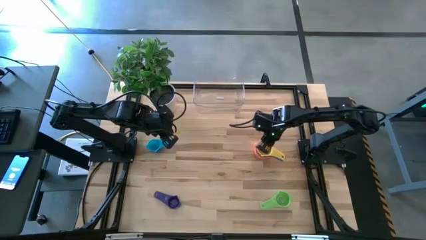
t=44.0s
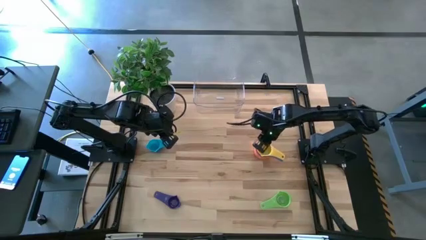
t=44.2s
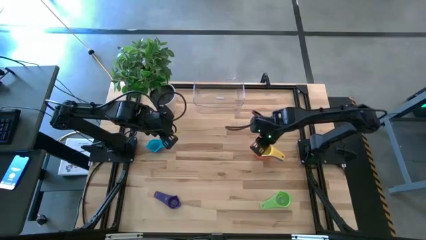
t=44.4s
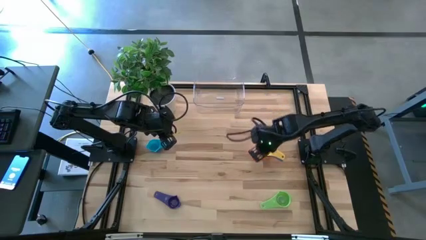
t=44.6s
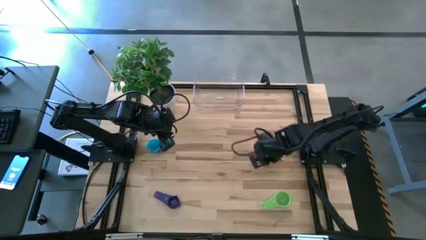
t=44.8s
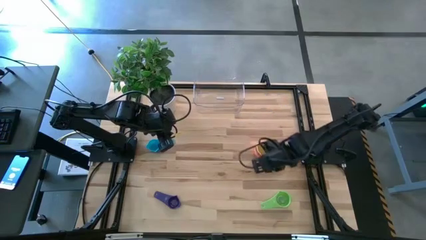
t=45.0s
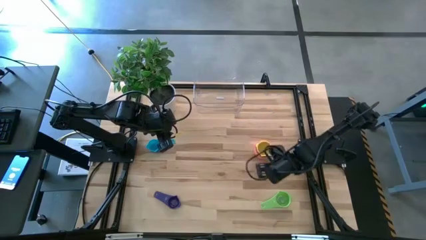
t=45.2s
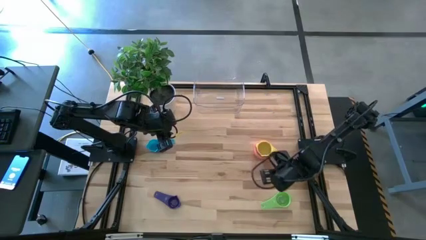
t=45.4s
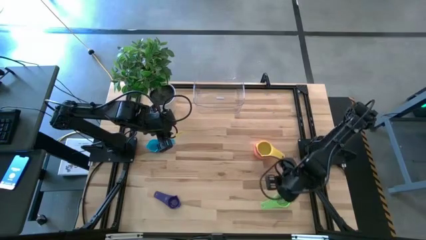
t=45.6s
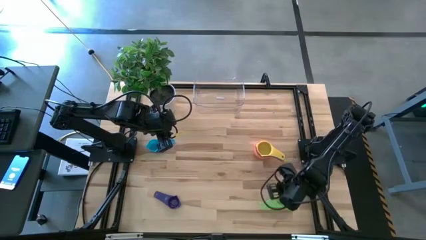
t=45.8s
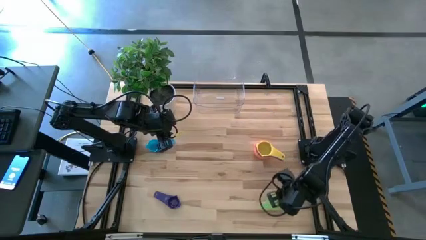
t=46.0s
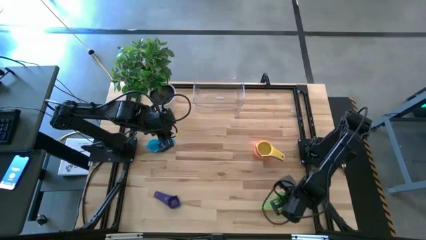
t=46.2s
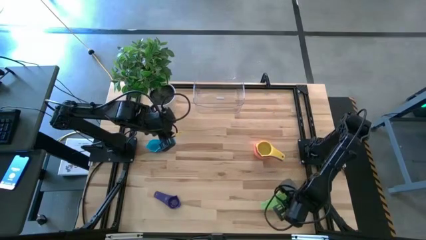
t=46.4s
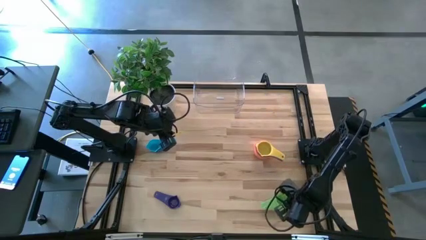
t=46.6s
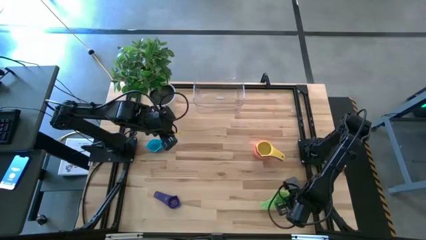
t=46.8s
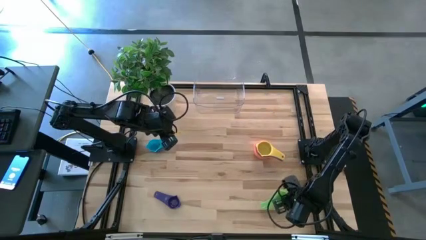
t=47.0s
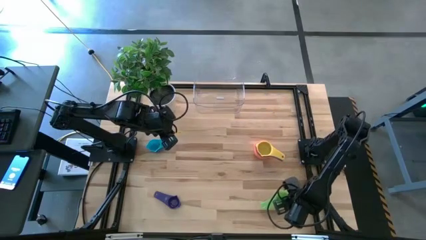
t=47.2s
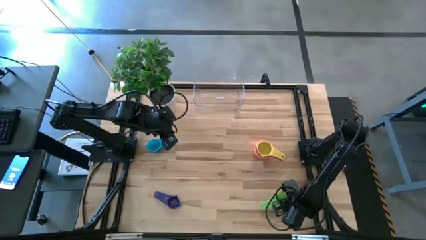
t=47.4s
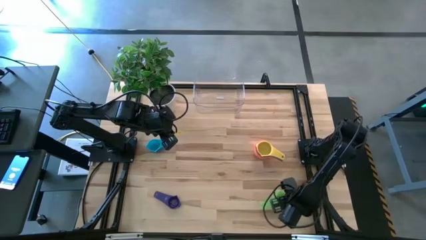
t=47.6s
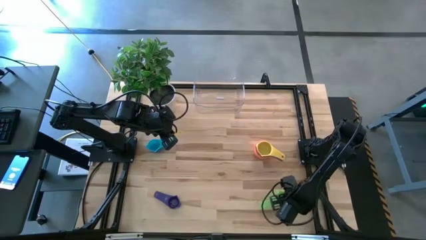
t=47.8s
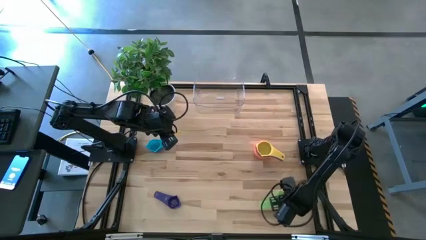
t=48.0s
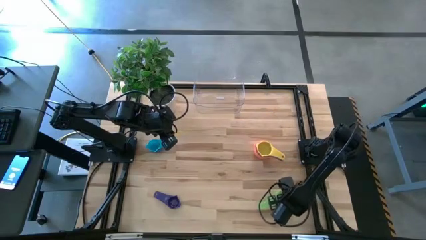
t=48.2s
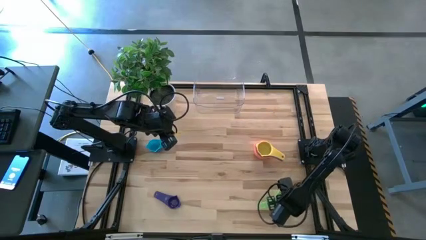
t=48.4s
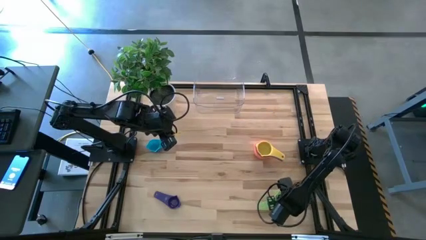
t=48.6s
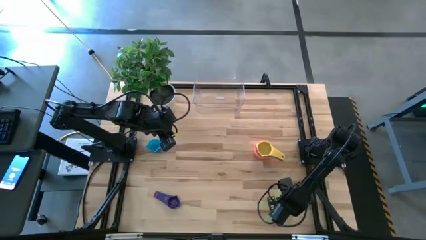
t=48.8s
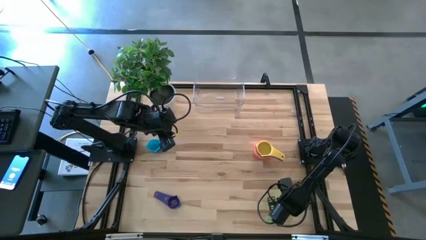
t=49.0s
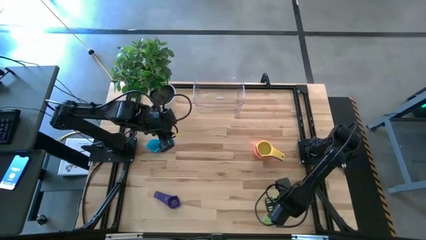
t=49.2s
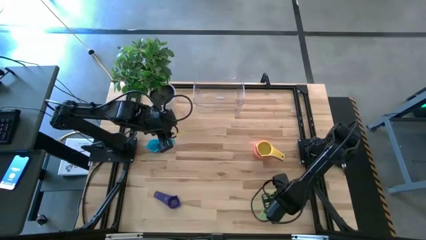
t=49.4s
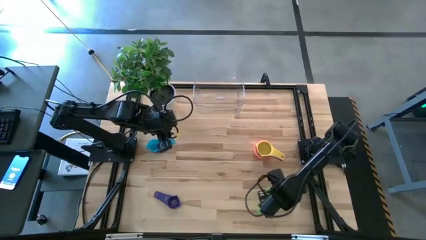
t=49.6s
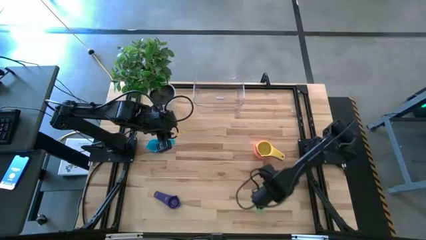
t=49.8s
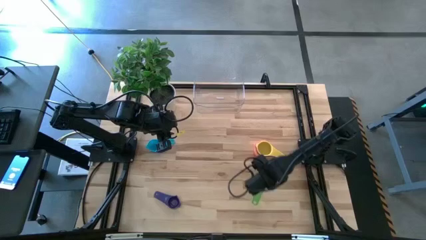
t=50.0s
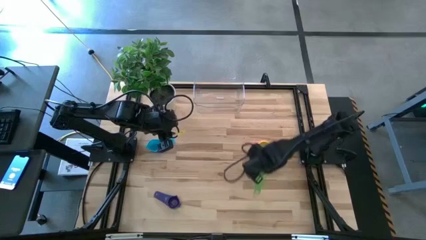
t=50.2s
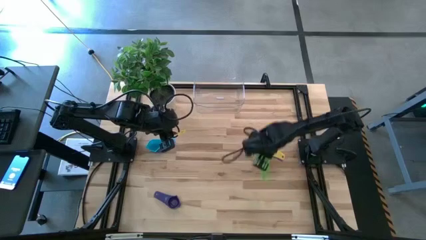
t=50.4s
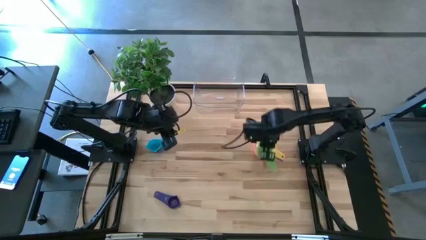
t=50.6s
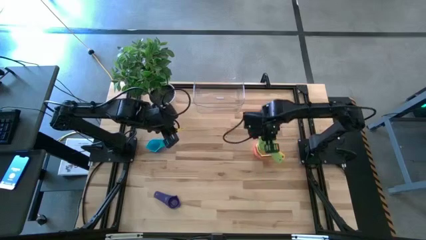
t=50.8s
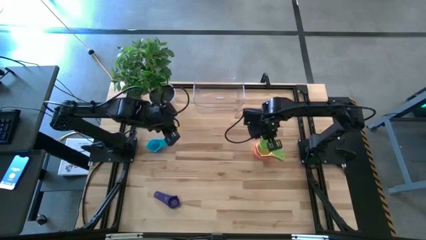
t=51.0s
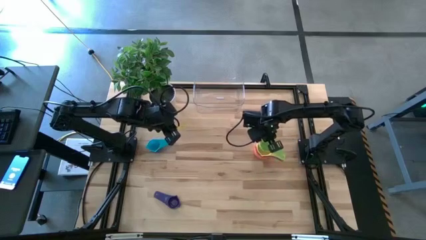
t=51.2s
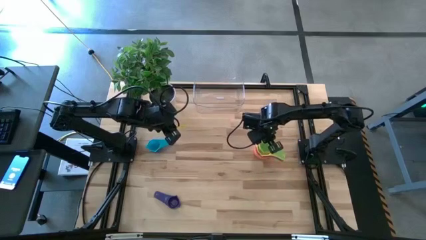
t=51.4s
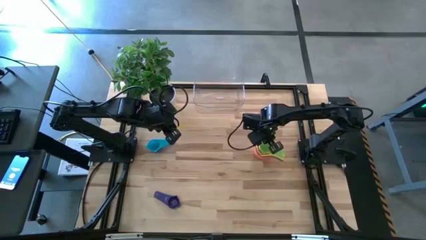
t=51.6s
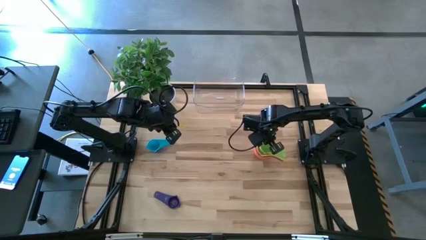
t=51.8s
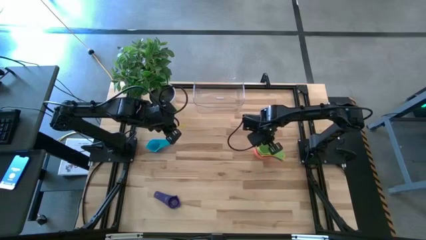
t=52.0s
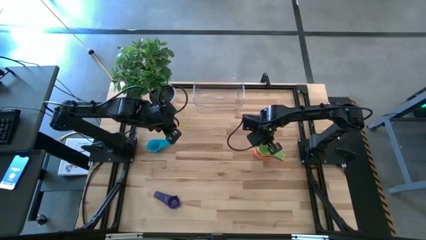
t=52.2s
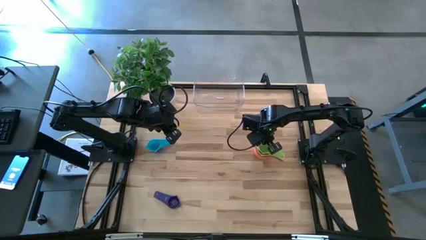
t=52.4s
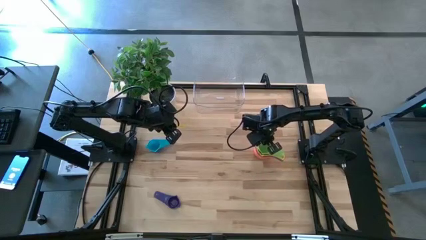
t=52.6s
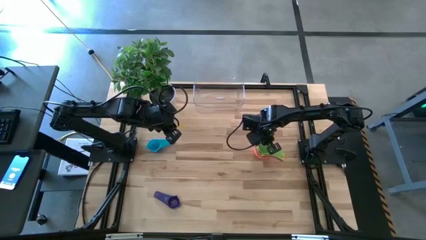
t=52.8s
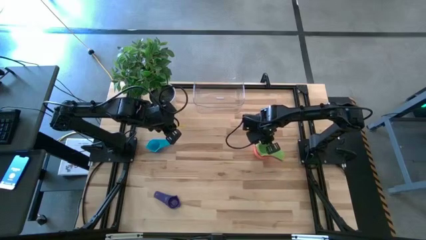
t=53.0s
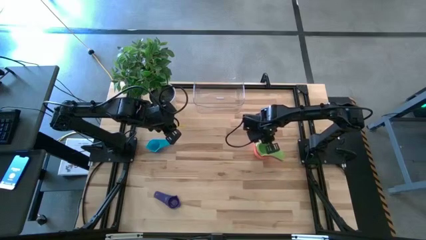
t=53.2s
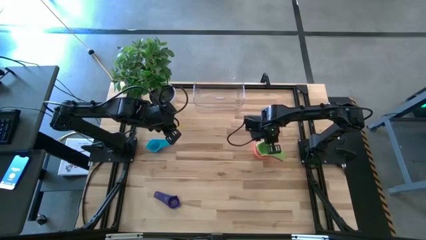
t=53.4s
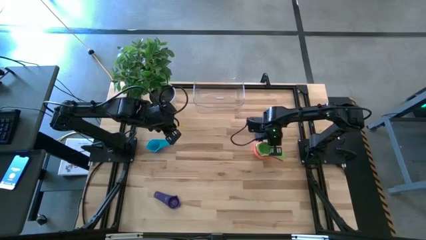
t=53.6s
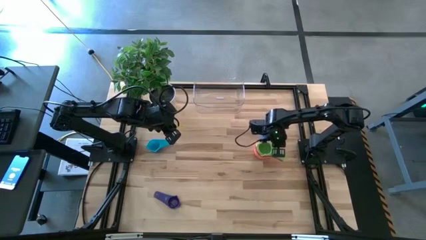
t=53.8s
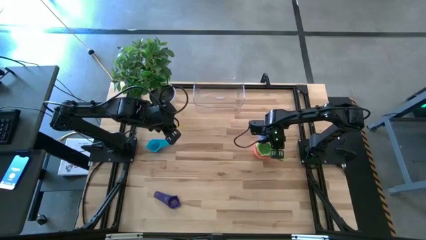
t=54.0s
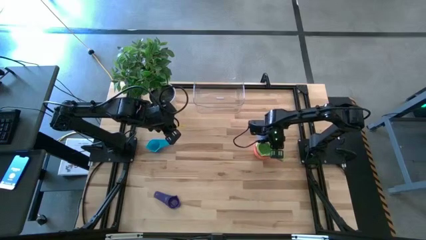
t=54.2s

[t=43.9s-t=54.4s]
Task: Nest measuring cups in basket
Stack the green measuring cup on top of the yellow measuring cup
